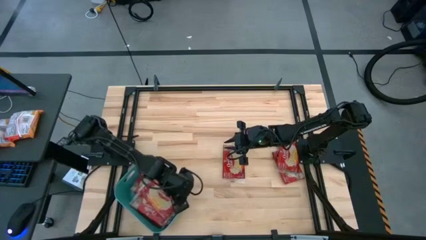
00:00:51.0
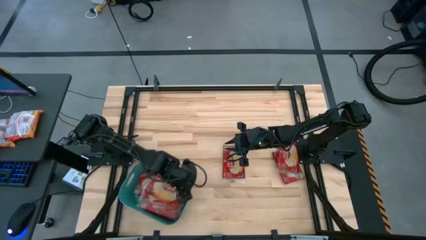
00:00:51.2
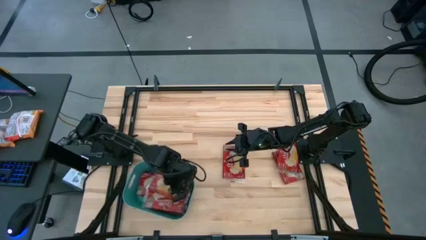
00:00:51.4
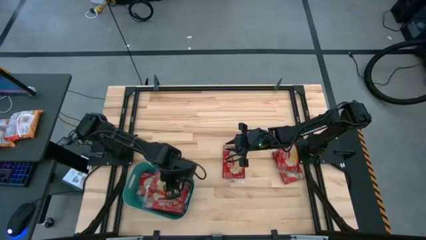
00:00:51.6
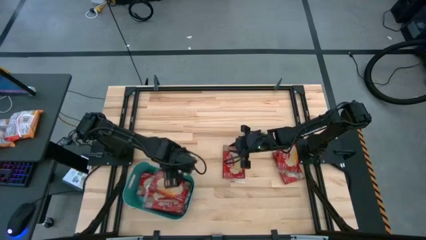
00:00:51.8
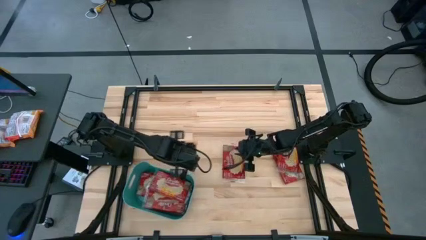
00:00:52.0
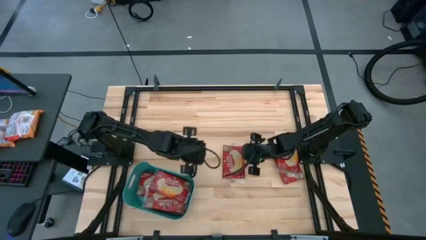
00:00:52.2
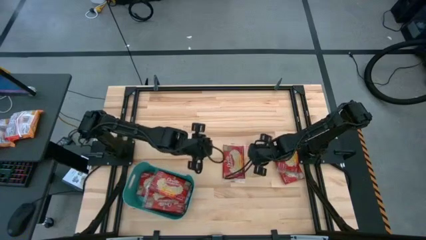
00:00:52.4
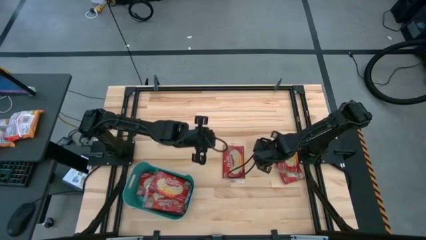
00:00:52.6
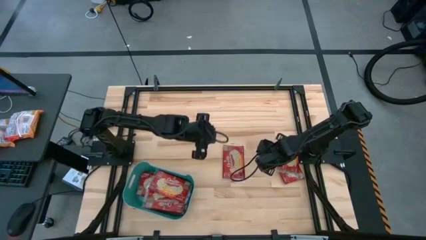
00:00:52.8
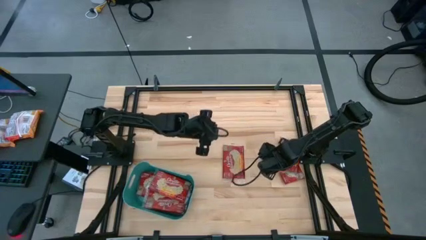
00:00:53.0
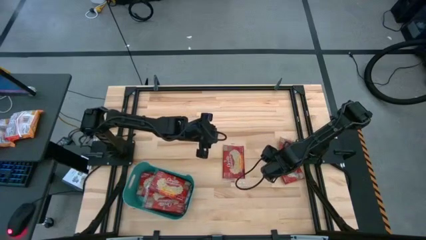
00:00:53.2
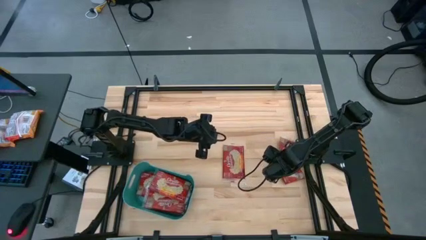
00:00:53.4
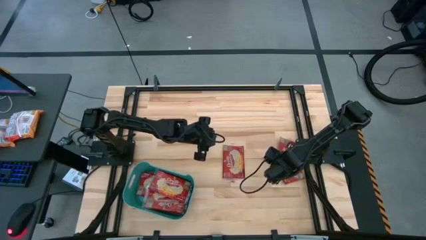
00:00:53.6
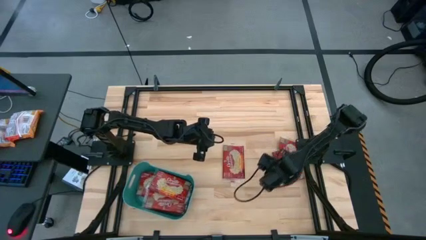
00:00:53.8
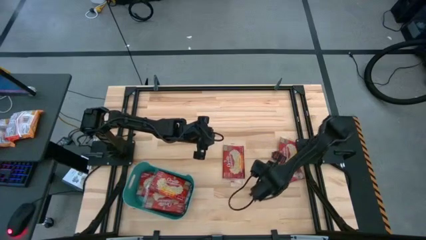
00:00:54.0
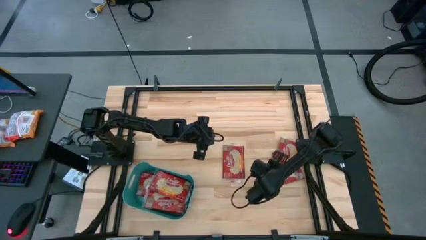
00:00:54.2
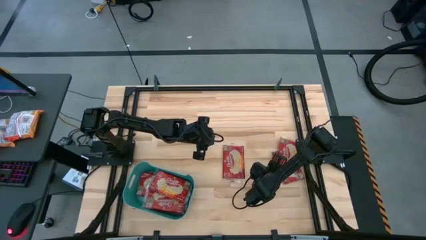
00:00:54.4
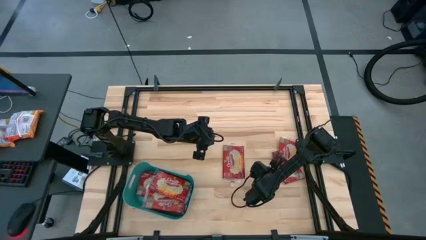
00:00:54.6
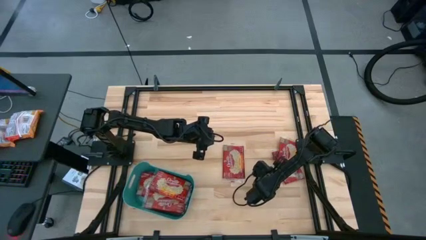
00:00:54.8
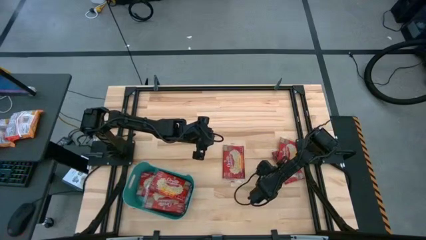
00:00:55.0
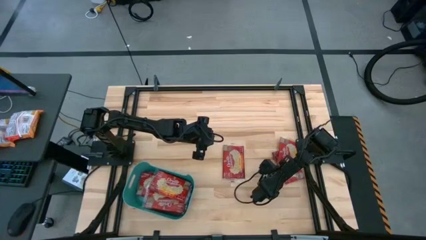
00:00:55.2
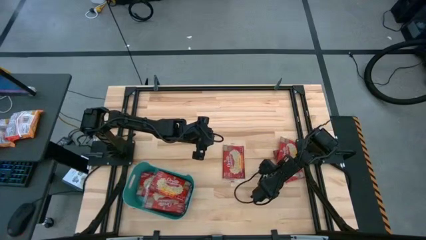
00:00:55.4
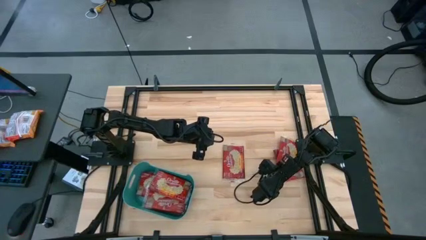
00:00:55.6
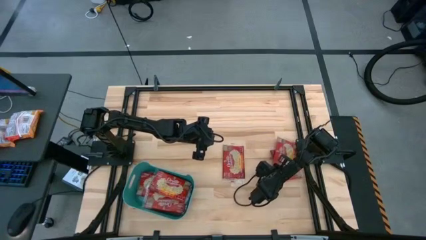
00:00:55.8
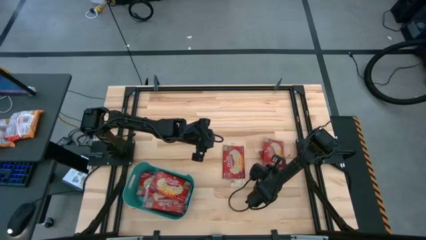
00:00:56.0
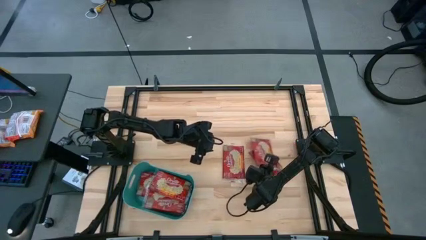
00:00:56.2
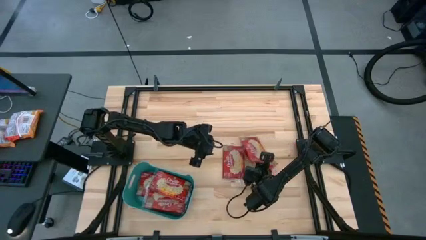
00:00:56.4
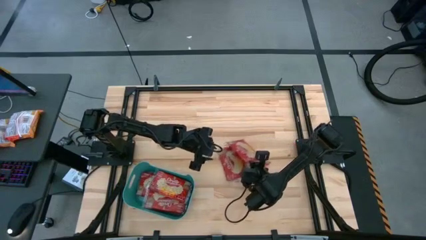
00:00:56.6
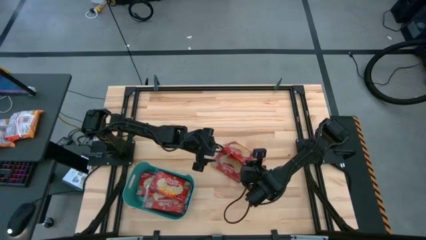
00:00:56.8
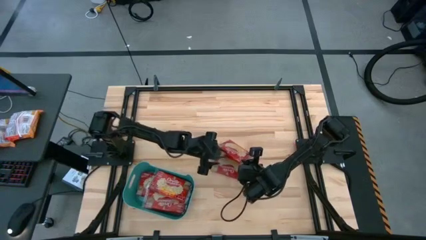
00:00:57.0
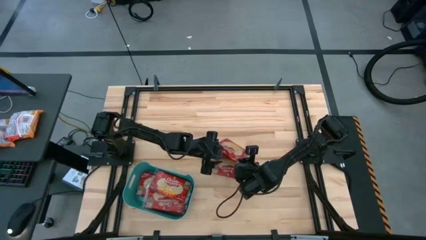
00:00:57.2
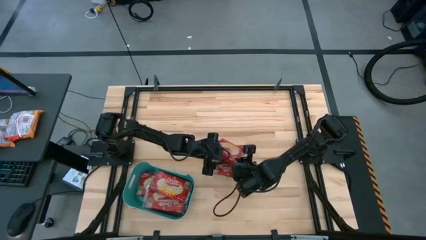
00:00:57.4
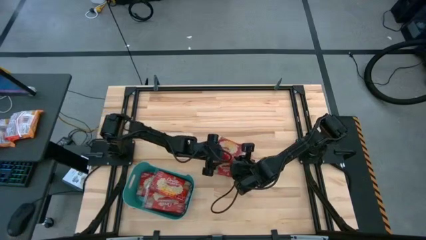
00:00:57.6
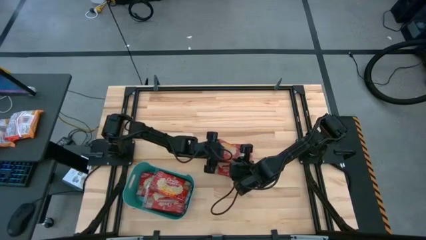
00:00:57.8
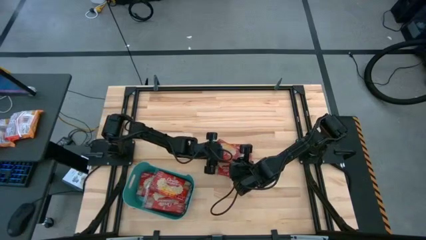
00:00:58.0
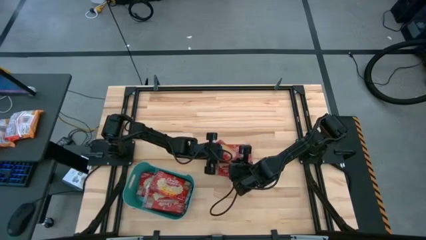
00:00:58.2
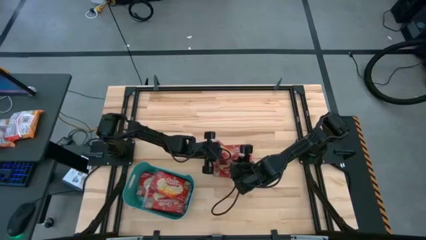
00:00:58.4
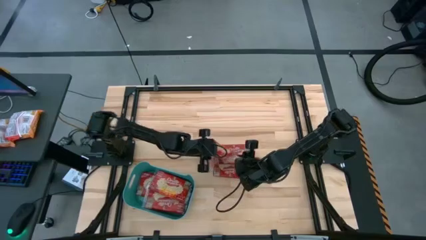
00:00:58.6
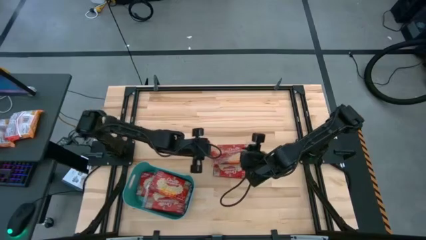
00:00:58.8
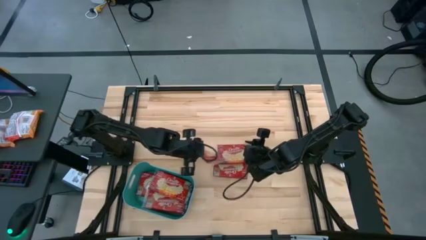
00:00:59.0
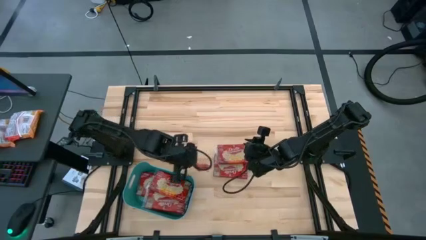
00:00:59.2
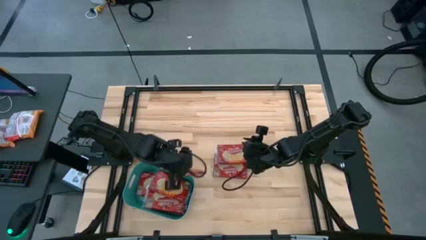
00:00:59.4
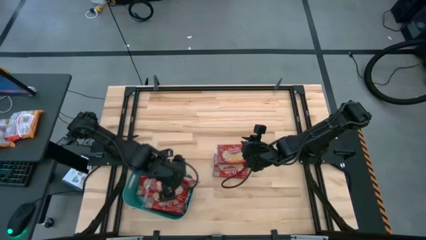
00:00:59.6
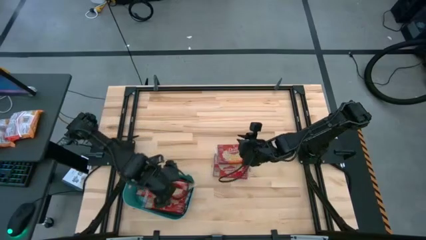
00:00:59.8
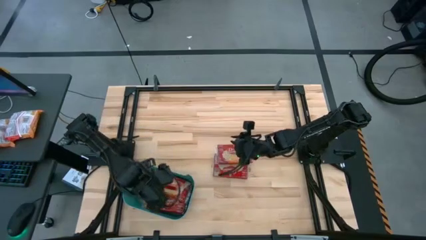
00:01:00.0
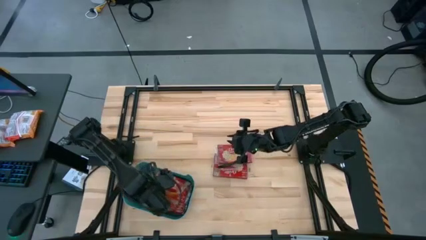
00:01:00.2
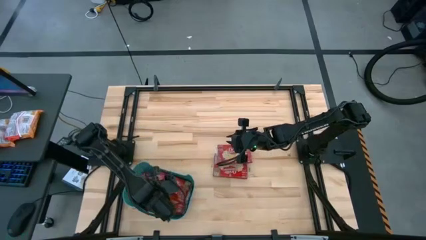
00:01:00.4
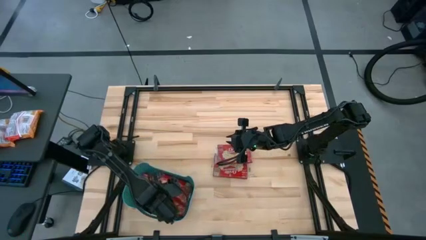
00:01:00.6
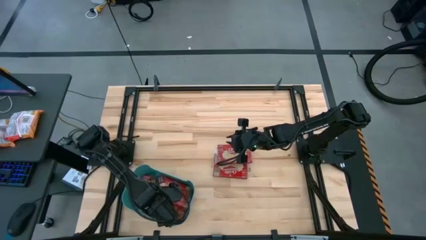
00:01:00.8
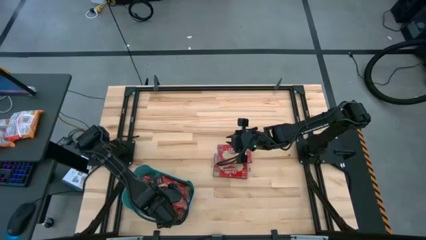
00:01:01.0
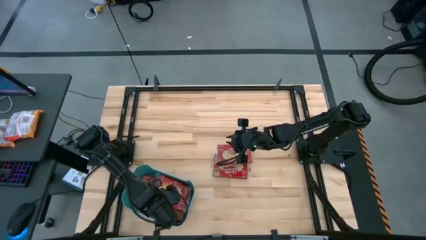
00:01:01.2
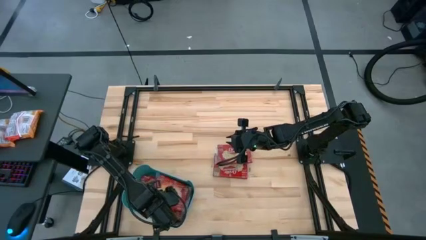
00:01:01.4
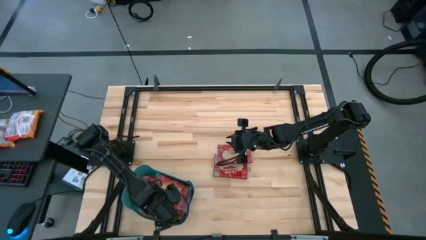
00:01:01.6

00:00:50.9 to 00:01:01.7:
Task: Sort popcorn bags into baskets
Put the popcorn bag into the blue bin

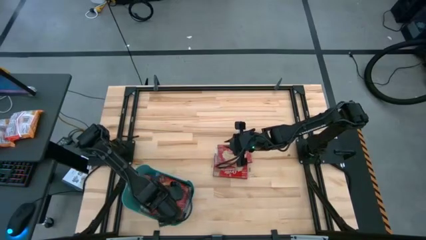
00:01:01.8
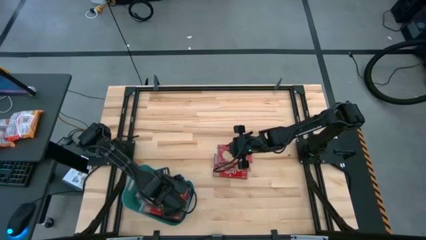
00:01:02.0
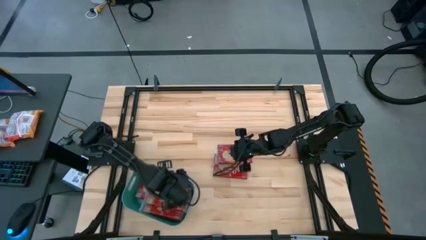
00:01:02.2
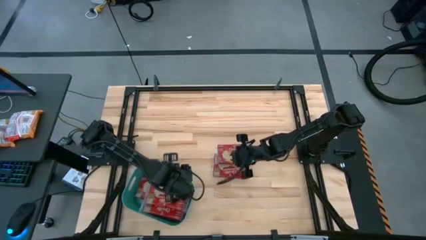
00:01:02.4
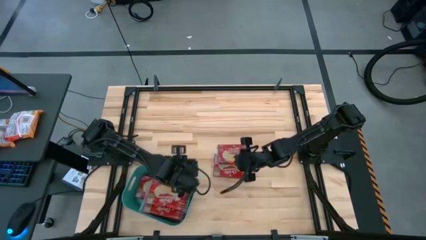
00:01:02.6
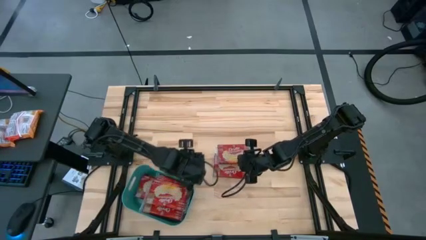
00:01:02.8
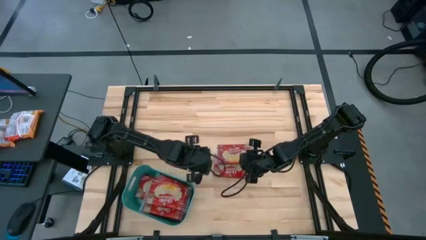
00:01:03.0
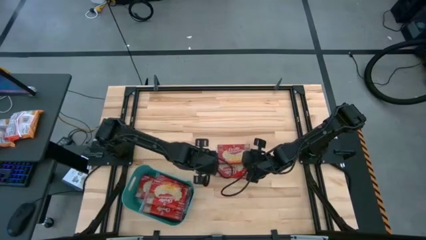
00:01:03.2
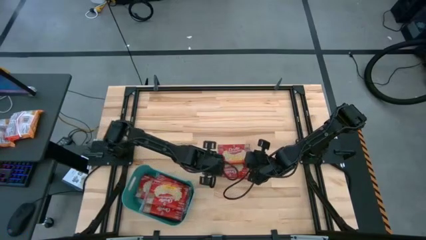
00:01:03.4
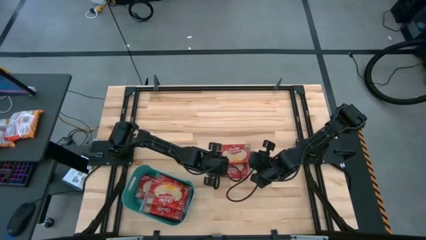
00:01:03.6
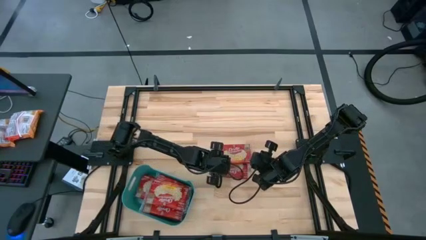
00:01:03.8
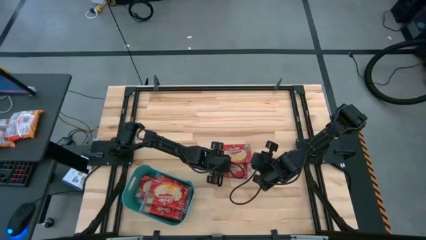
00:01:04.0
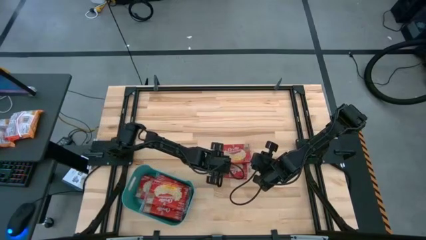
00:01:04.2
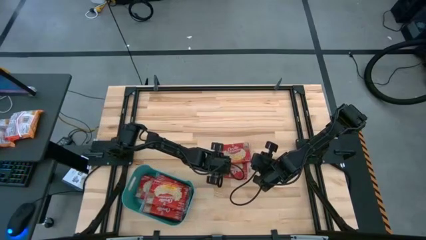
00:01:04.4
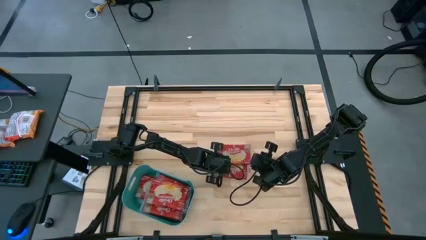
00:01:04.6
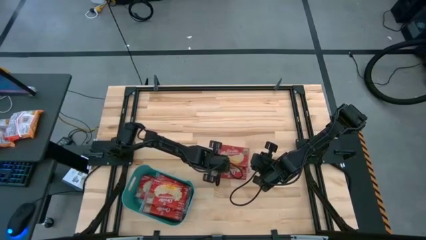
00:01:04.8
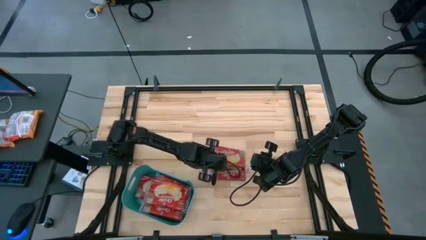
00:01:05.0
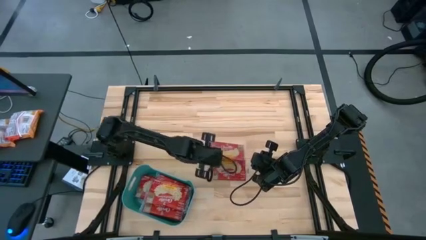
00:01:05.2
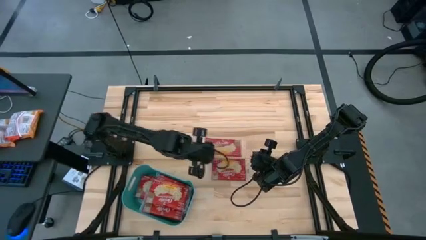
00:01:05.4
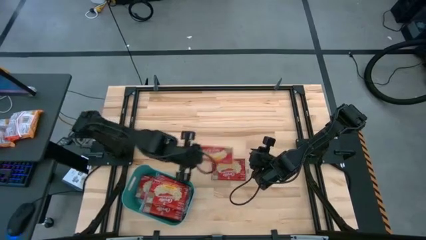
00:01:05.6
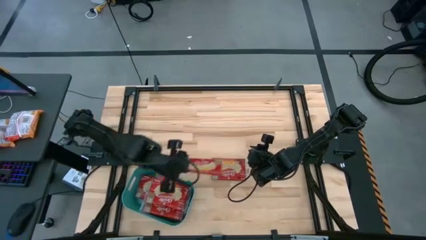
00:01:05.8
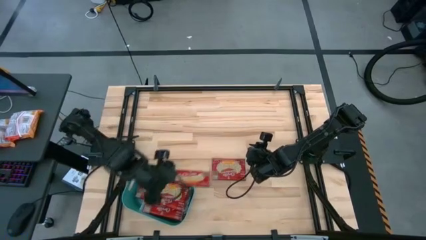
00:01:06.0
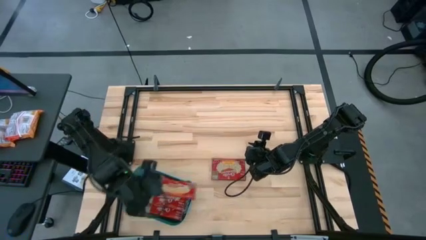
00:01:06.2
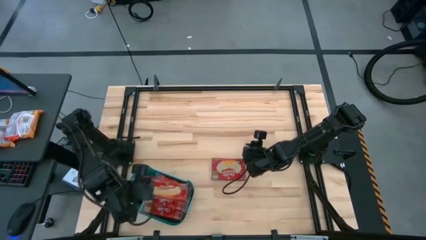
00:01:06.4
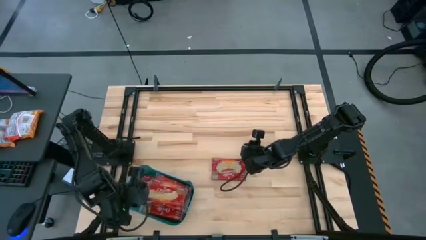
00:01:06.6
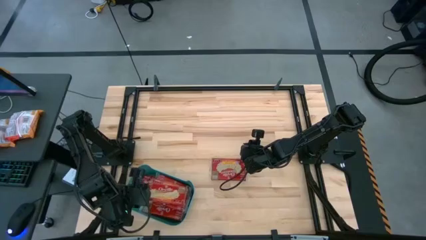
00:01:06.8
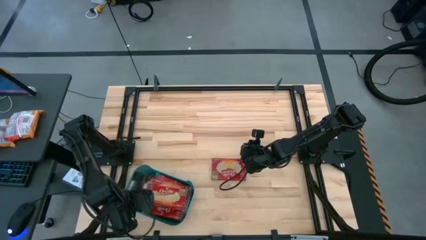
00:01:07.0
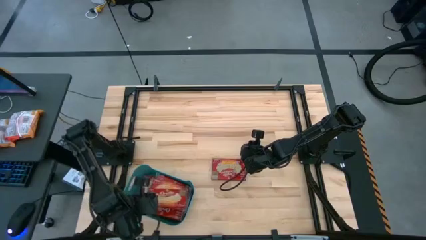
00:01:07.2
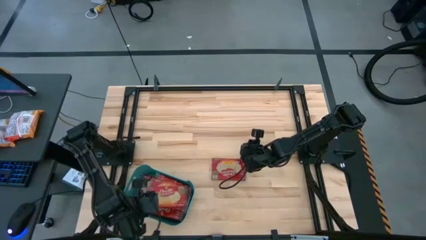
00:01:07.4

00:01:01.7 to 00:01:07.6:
Put the popcorn bag into the blue bin
